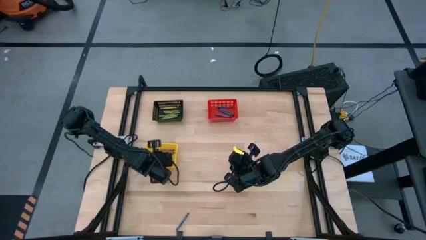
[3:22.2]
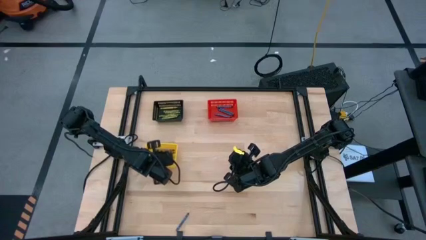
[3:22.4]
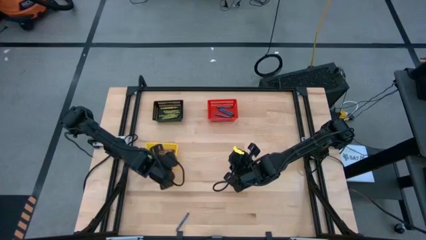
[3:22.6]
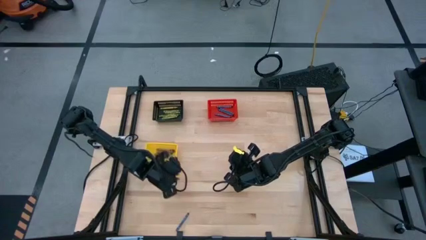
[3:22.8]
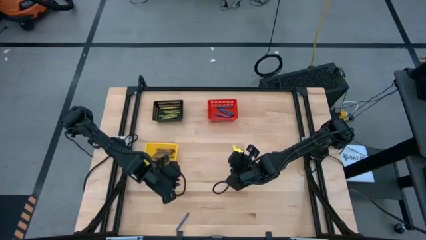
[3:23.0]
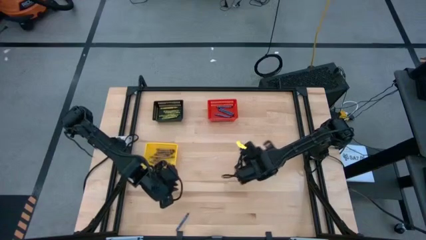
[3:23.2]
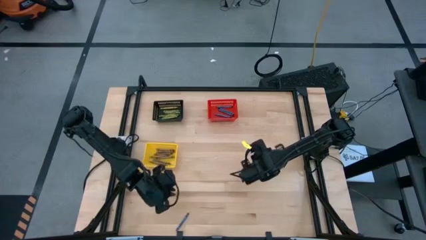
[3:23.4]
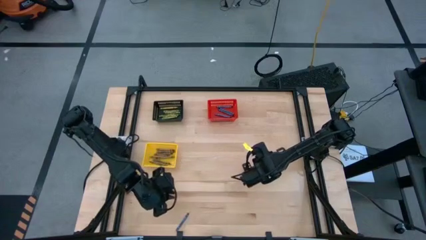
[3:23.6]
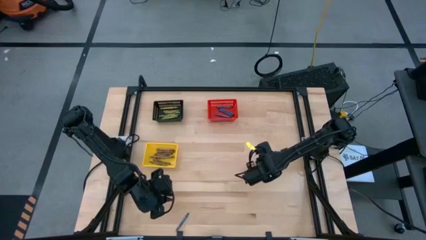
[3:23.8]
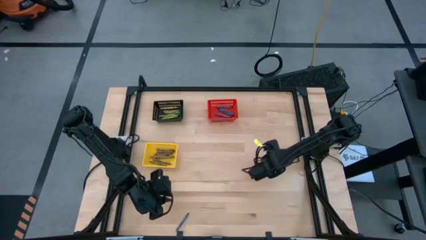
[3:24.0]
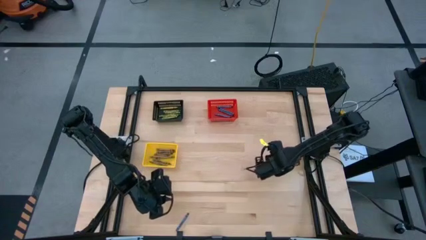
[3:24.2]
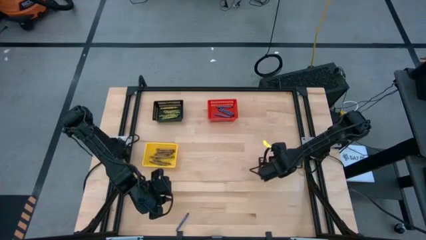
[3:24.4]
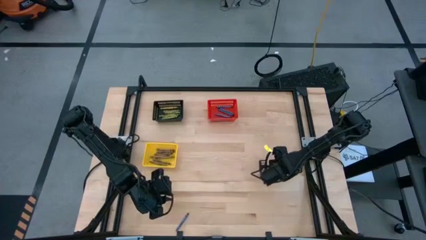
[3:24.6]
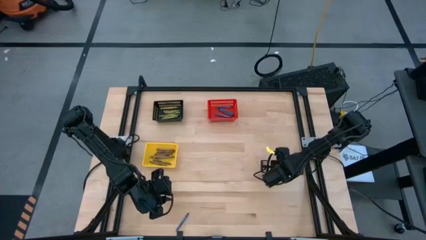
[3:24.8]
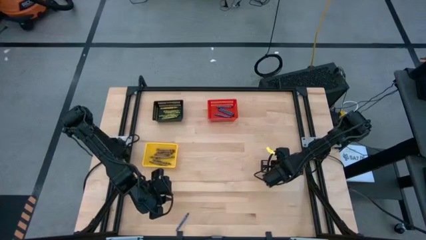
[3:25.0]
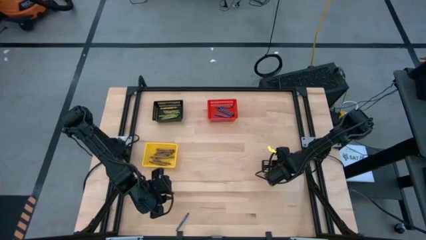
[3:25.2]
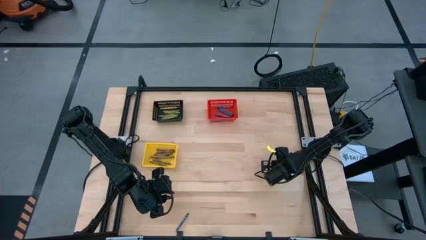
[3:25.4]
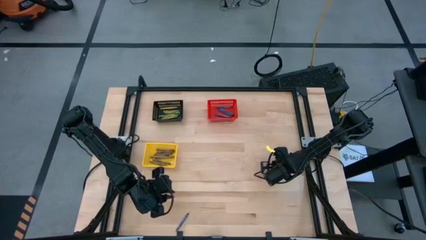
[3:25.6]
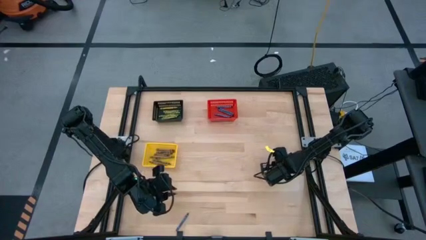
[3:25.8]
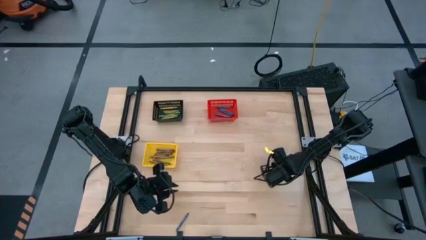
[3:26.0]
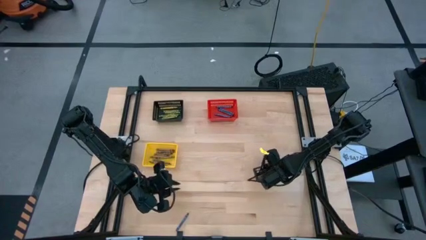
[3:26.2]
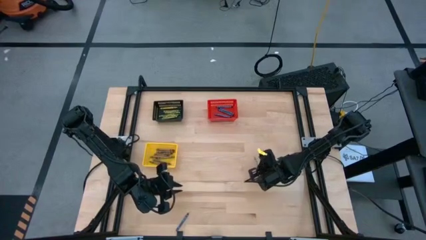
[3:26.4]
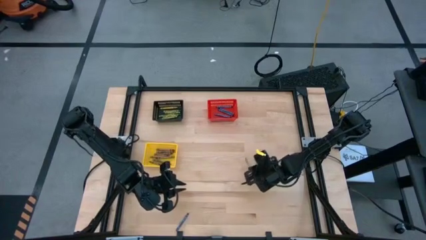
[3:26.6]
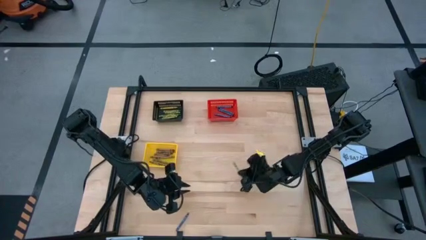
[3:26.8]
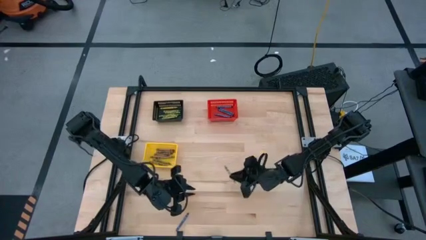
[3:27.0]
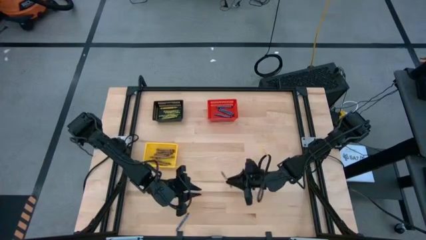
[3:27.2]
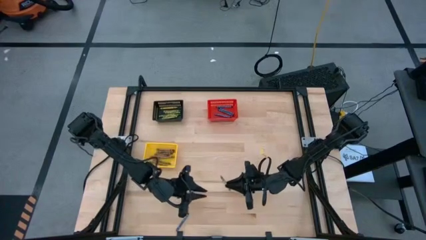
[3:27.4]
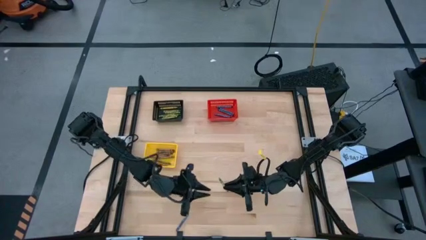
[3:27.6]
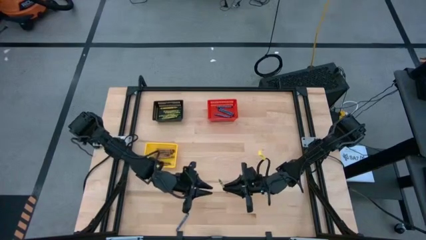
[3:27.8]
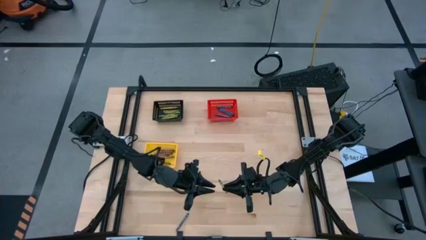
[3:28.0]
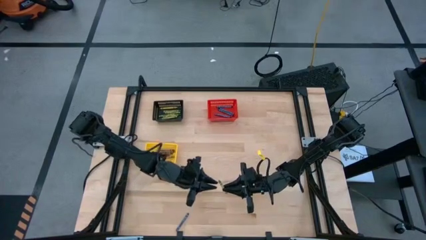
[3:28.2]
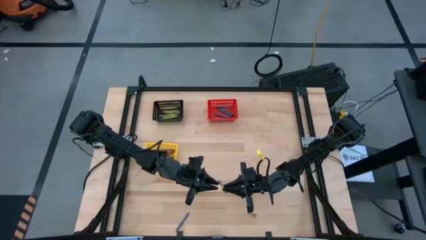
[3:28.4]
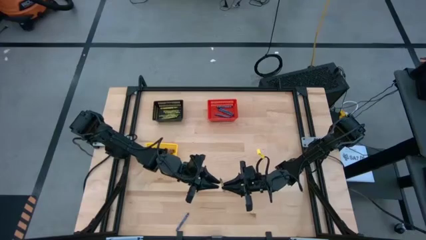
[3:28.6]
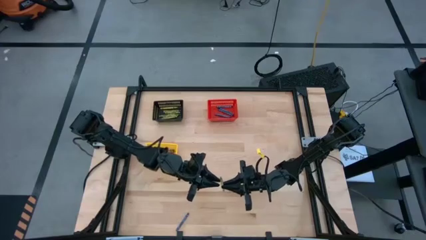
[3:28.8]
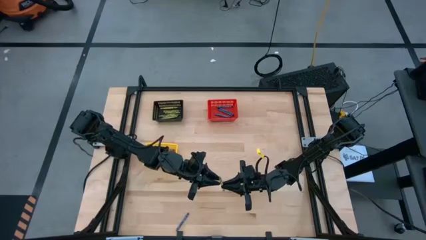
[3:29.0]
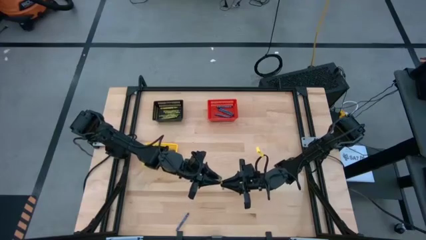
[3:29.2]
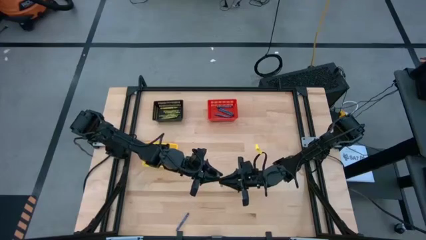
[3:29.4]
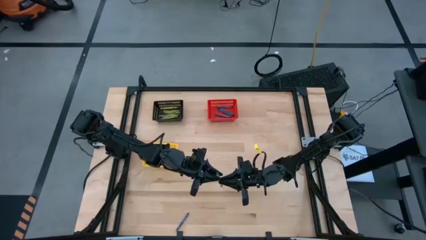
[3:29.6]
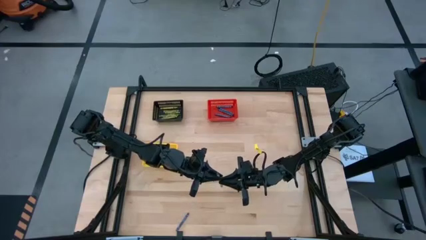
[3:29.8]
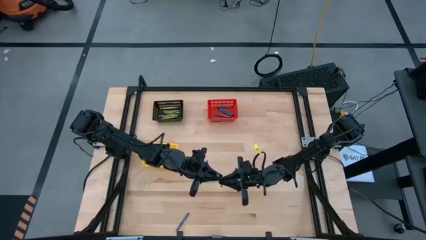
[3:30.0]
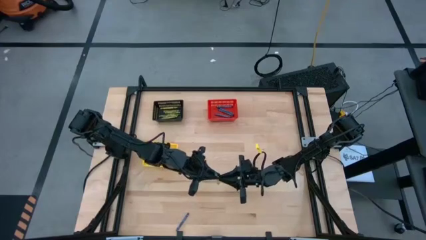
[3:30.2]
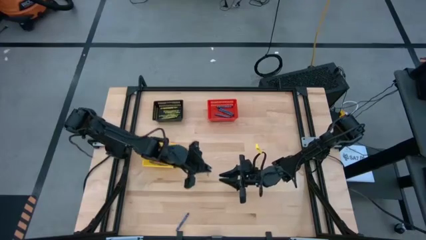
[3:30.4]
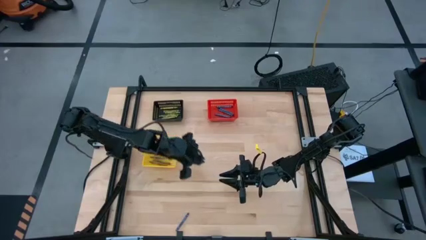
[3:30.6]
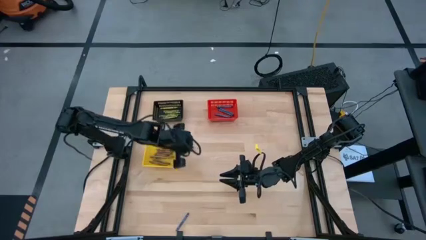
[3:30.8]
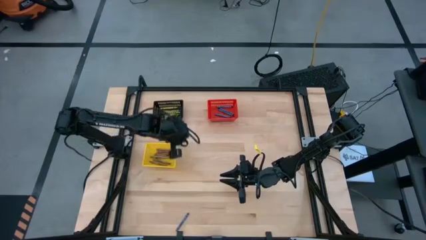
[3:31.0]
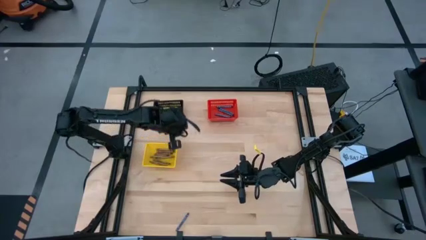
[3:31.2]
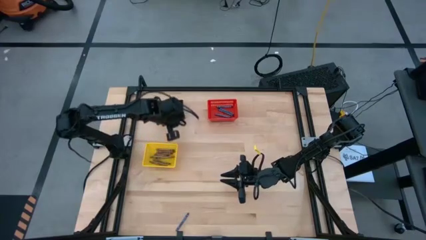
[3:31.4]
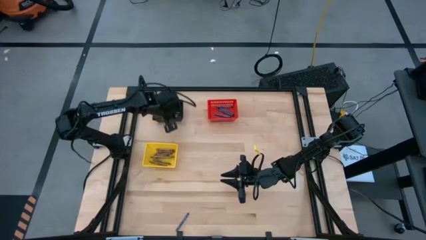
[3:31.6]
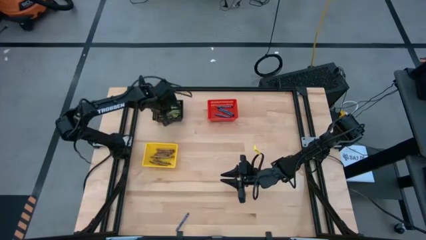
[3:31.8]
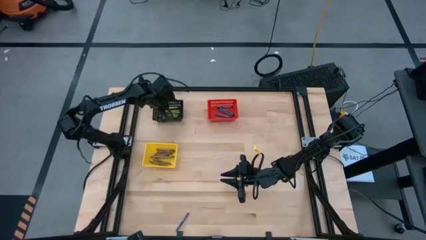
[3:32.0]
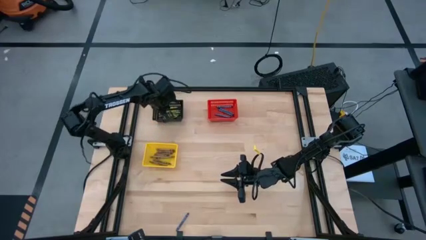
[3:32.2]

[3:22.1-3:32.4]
Task: Sort crayons
Put the green crayon into the black basket

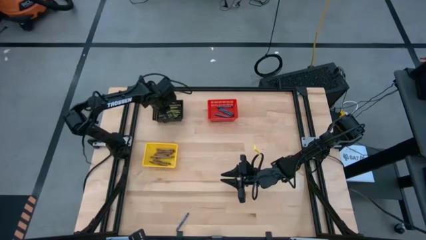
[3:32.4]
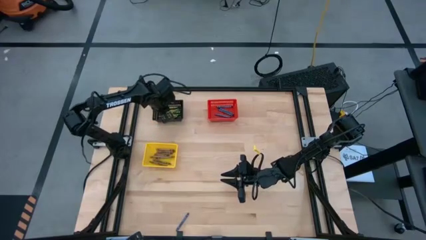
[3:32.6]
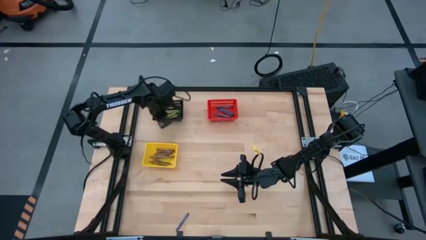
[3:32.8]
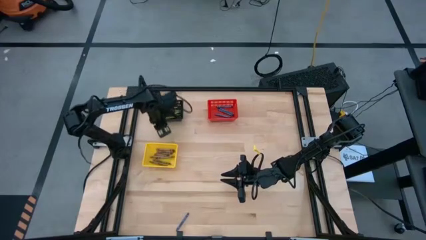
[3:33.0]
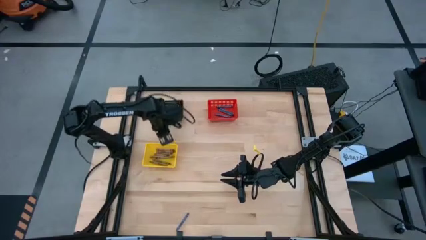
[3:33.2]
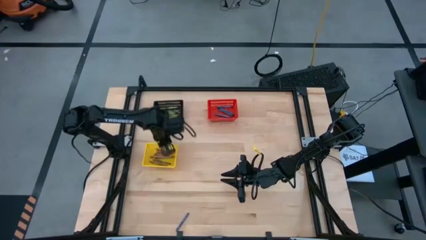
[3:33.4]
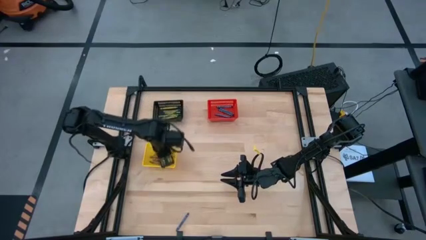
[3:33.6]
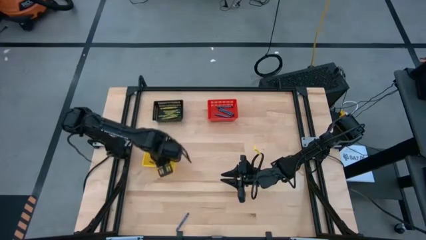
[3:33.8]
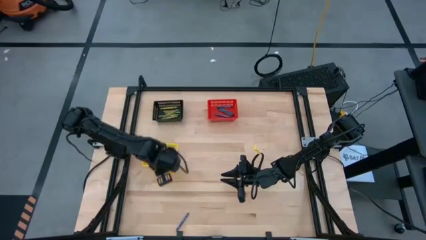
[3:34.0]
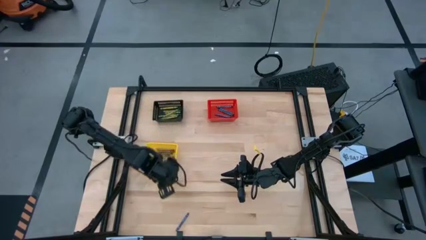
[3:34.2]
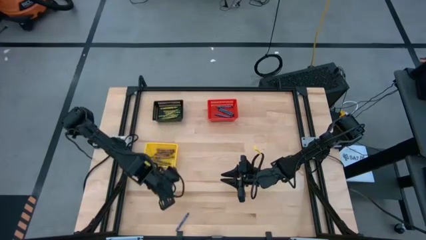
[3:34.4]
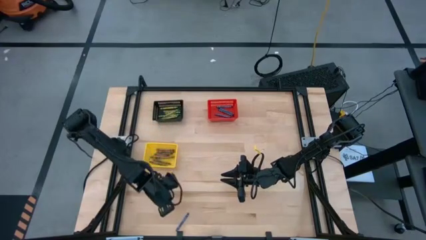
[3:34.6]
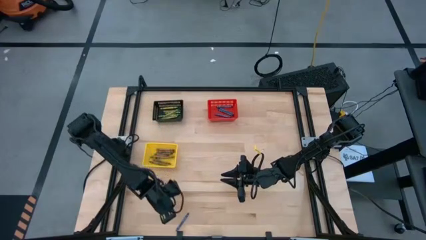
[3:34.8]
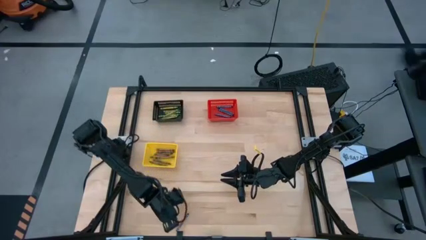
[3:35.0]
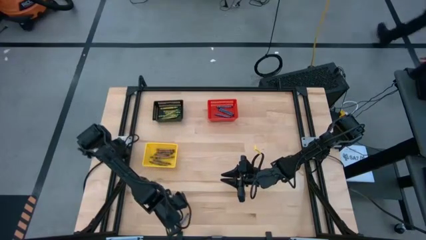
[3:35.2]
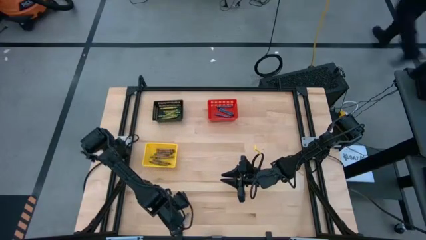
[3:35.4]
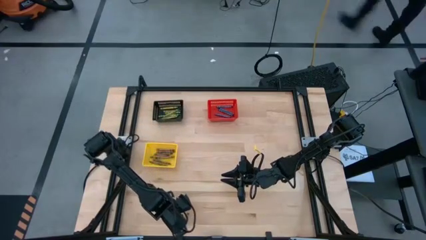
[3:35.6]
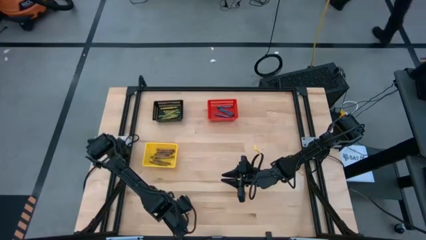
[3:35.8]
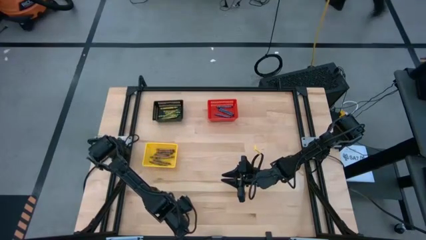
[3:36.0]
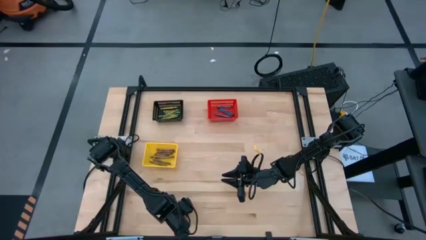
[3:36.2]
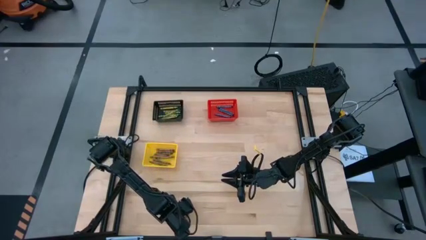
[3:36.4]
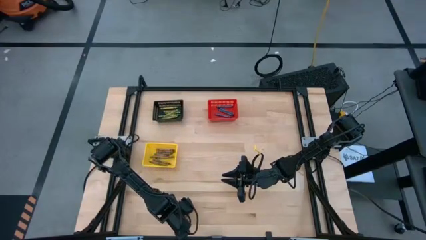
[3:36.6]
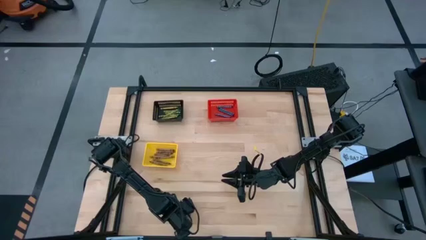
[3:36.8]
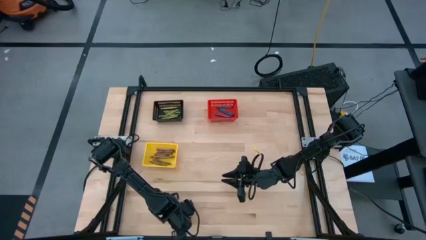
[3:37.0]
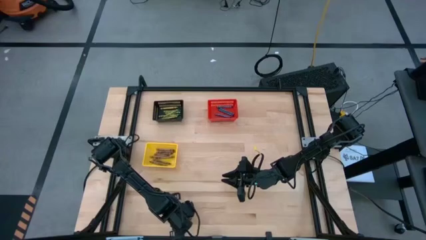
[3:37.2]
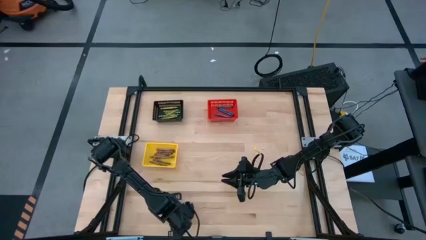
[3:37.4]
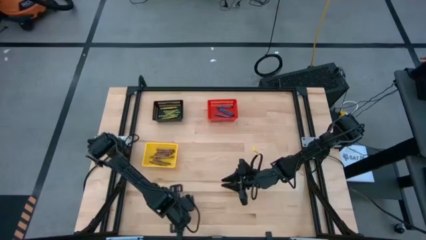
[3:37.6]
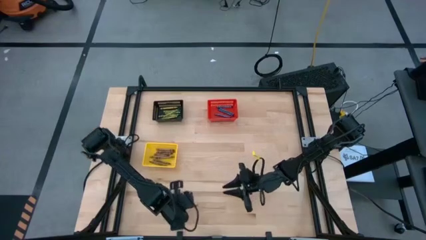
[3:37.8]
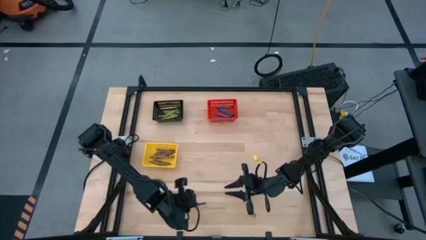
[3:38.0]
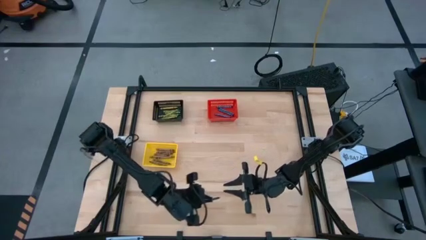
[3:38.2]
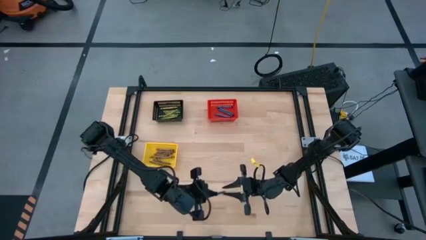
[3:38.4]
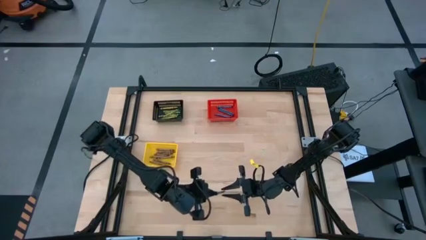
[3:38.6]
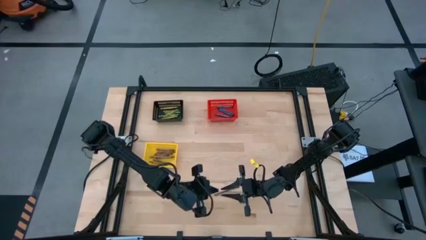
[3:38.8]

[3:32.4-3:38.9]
Put the blue crayon into the red basket
